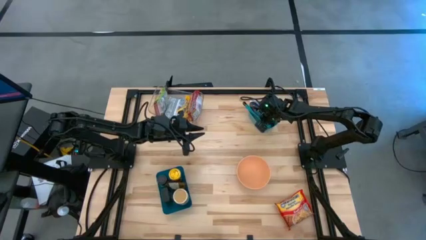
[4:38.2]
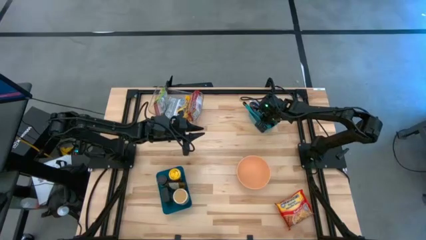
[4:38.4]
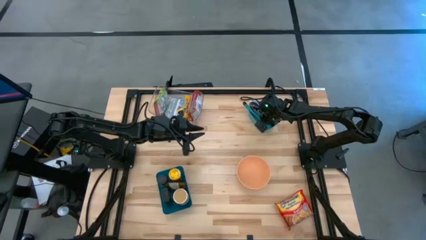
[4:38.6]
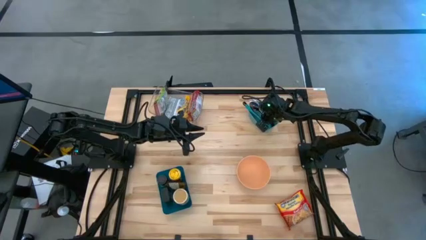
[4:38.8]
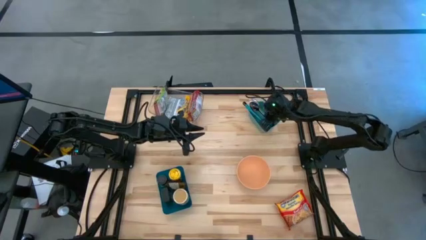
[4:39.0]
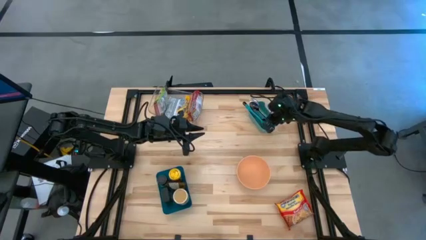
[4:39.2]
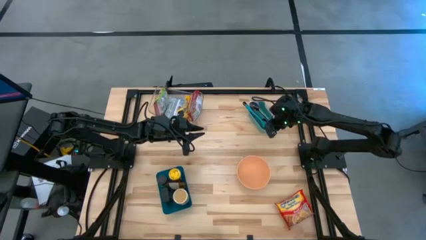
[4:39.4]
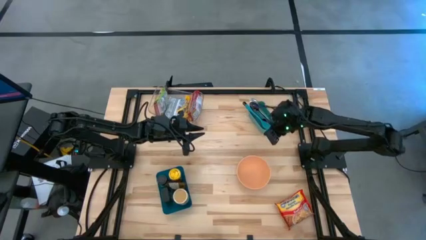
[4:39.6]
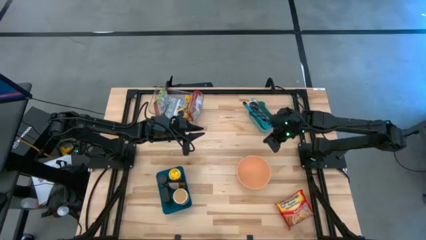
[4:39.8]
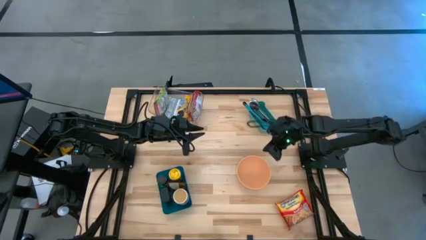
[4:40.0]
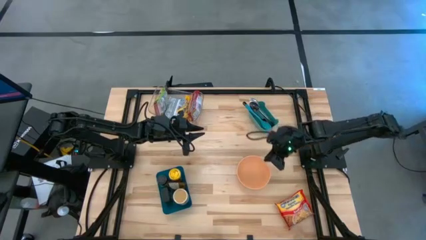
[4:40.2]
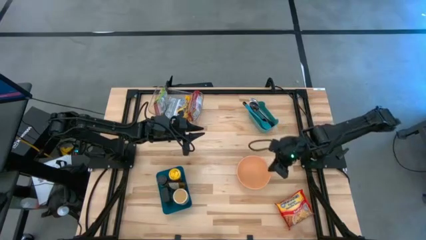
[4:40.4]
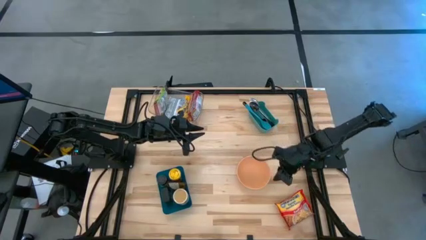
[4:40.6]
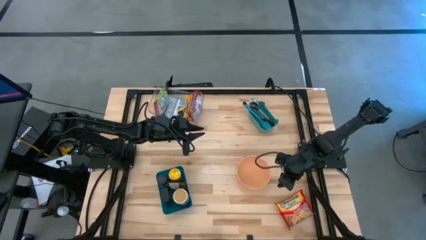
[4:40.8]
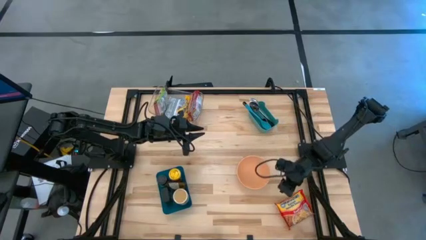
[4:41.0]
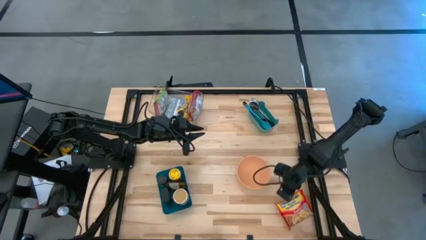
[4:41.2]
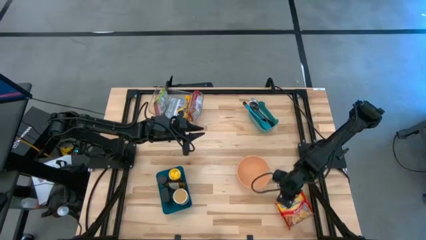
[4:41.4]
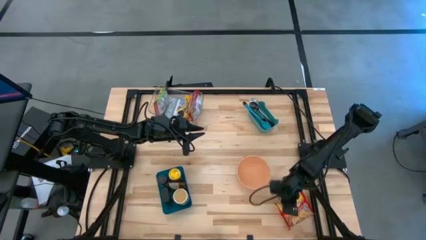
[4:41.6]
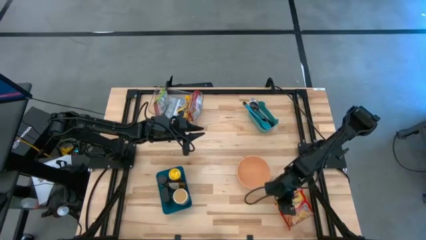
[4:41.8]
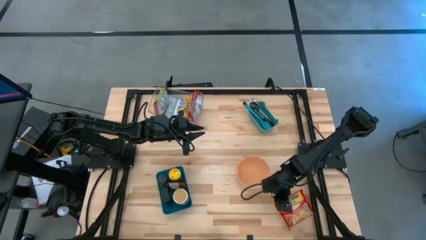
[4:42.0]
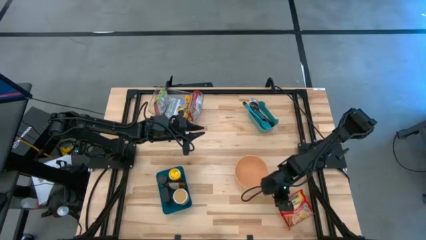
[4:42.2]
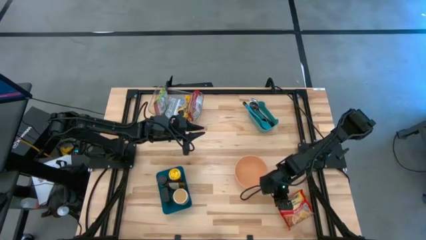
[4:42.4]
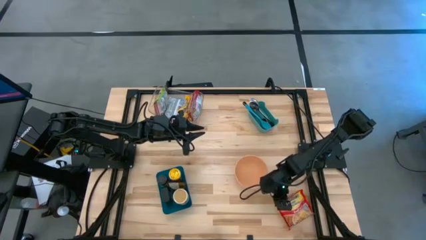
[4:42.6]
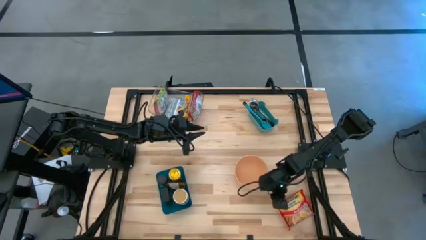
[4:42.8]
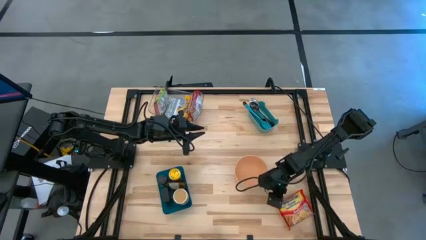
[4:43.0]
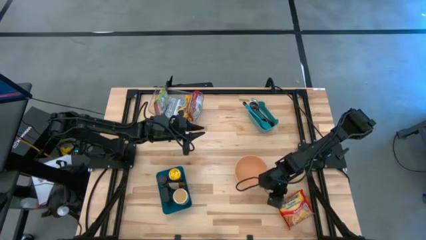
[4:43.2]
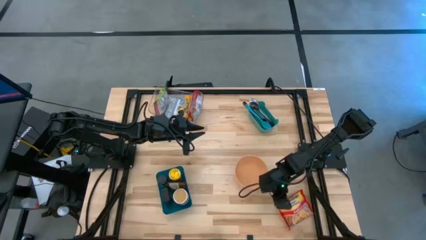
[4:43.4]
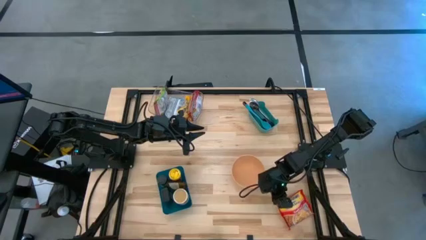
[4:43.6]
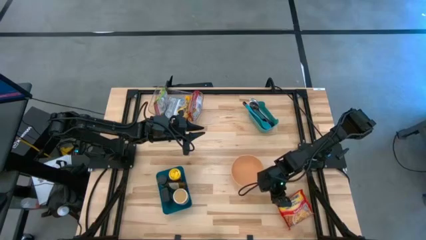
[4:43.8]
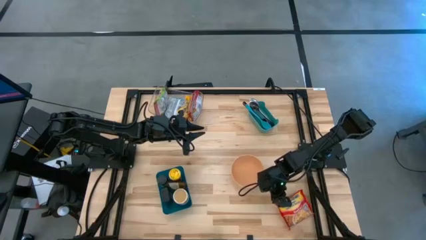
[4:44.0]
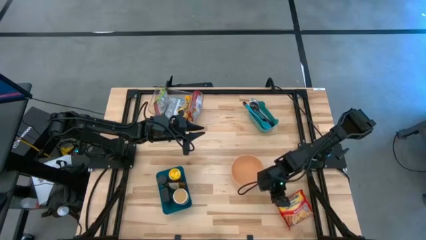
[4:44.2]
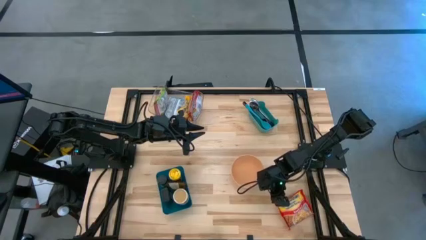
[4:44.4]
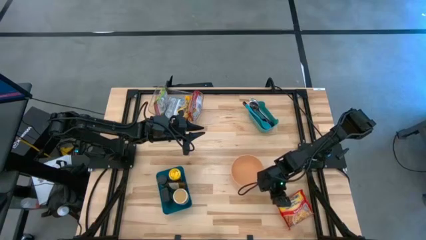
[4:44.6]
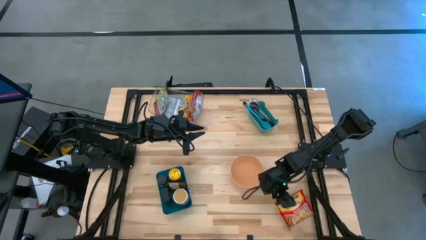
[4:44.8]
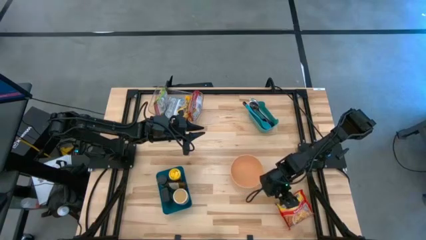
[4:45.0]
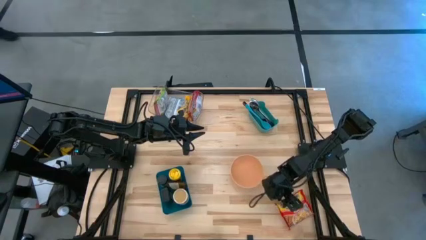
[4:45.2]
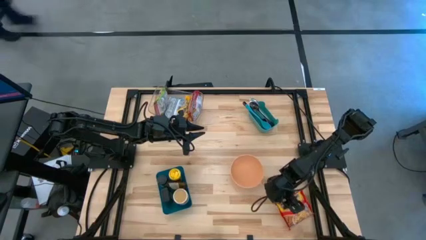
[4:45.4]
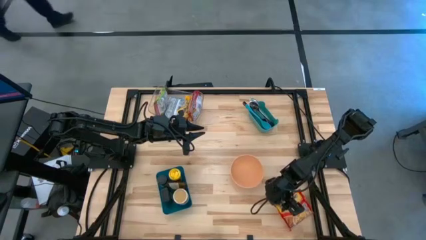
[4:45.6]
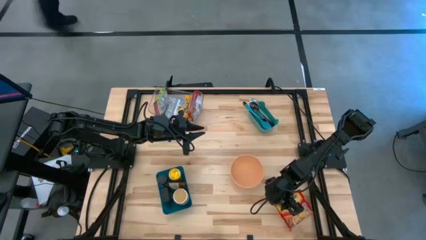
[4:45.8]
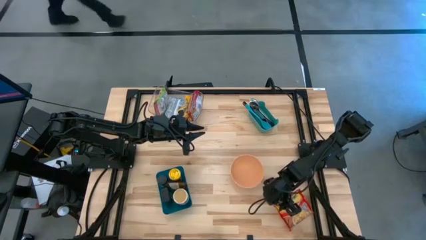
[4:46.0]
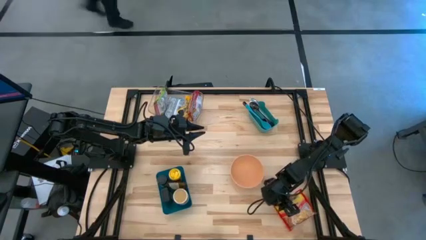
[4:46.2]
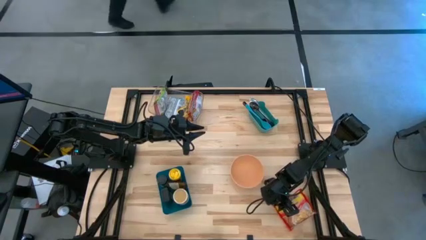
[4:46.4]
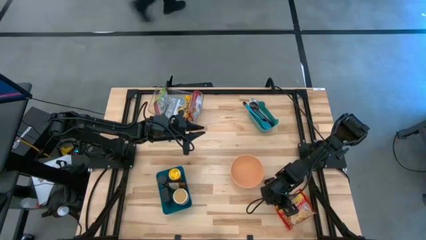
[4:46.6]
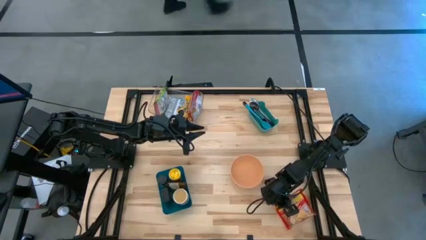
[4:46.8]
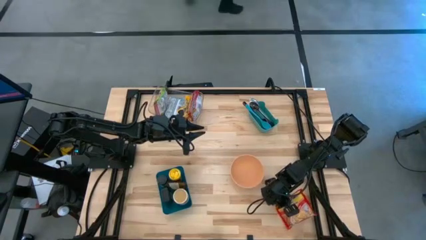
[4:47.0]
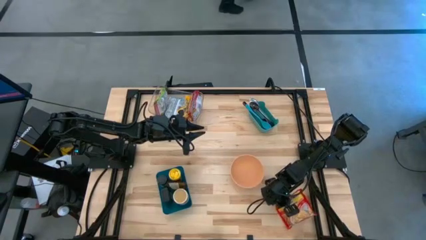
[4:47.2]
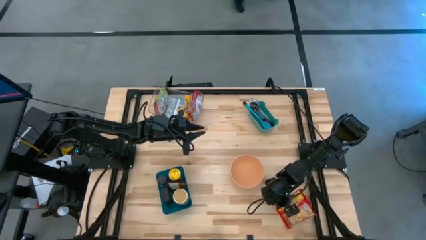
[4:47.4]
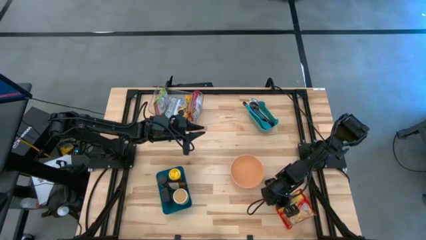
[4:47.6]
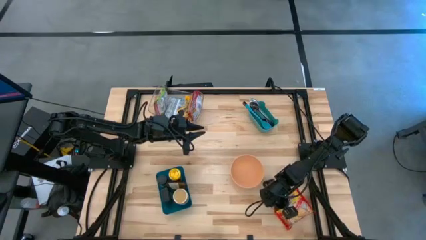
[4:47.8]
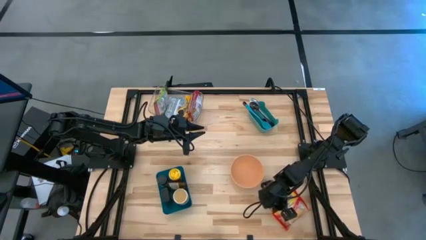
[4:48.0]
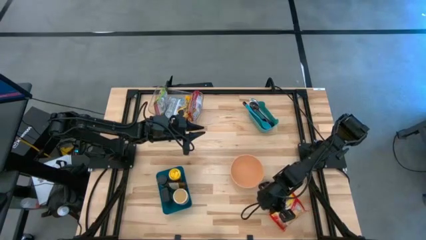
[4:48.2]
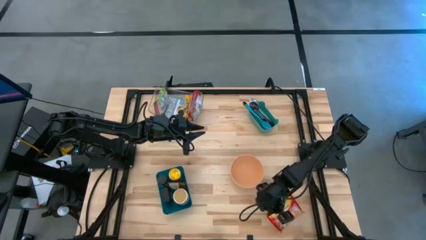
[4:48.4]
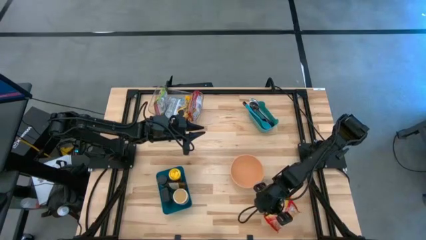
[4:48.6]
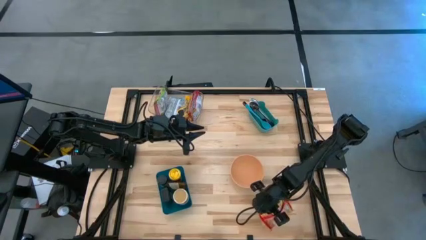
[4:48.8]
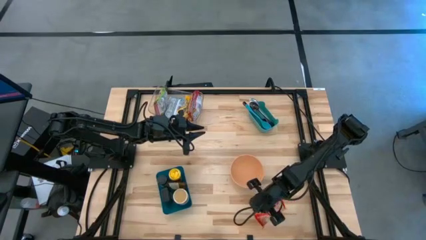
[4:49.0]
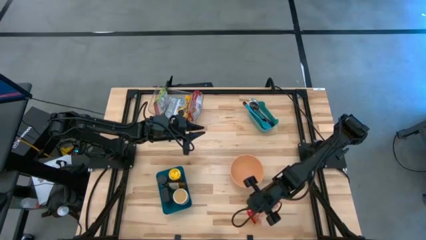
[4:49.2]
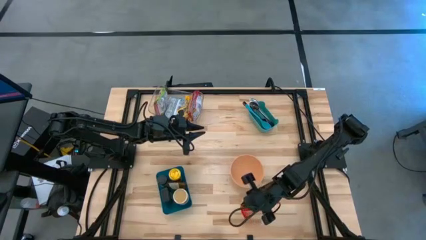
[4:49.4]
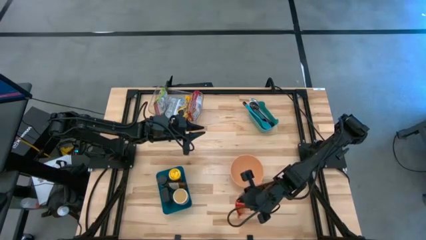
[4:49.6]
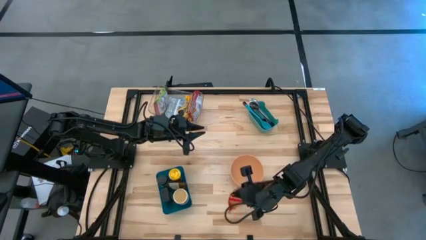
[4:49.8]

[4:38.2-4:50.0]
Task: Pick & Place Food Item
Put the red noodle pack into the transparent bin

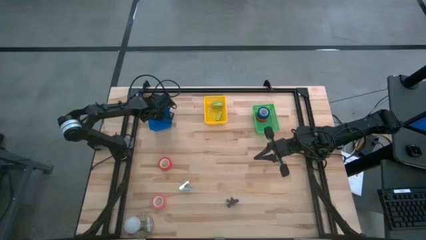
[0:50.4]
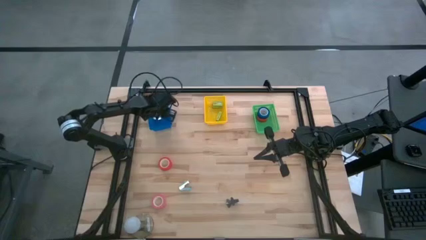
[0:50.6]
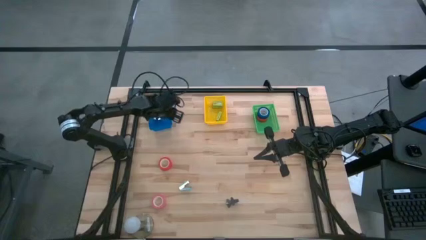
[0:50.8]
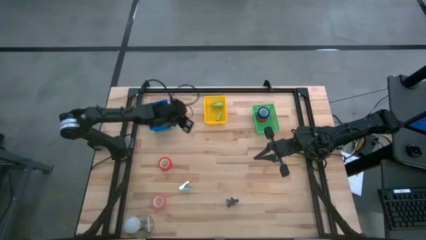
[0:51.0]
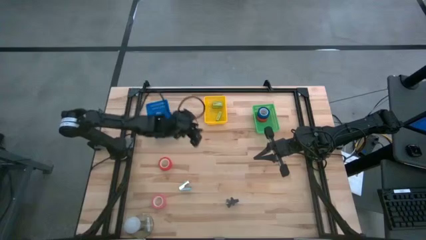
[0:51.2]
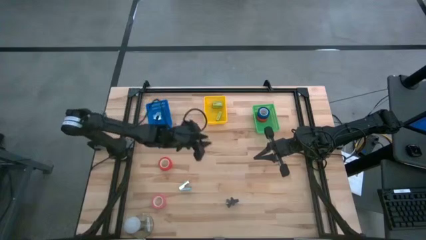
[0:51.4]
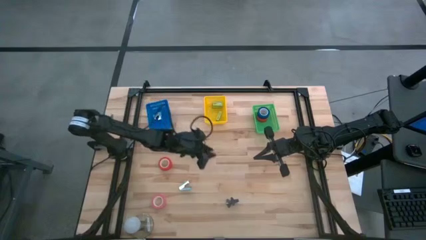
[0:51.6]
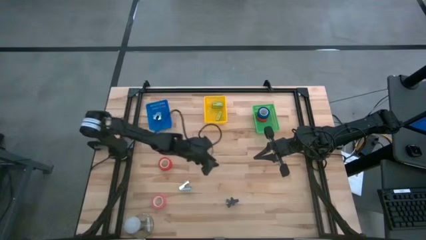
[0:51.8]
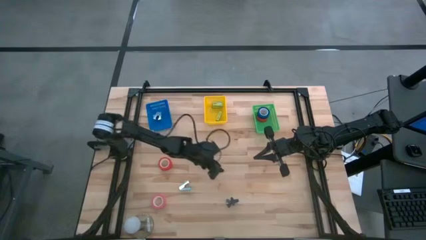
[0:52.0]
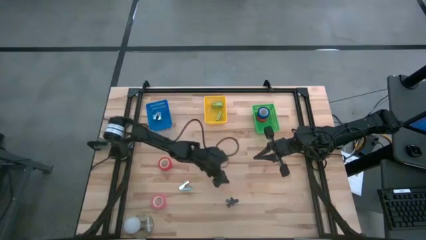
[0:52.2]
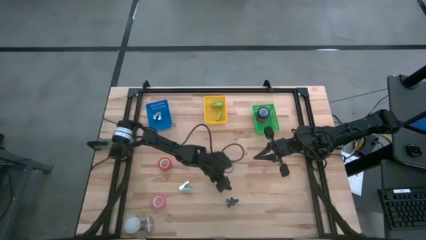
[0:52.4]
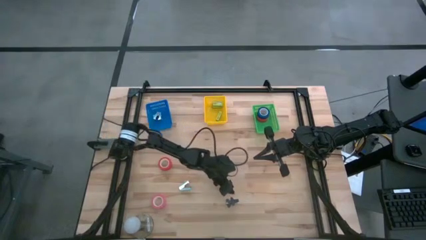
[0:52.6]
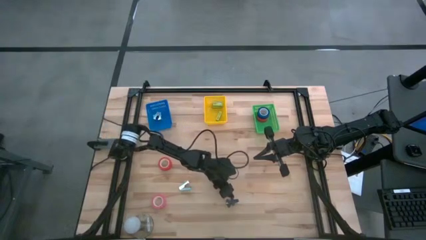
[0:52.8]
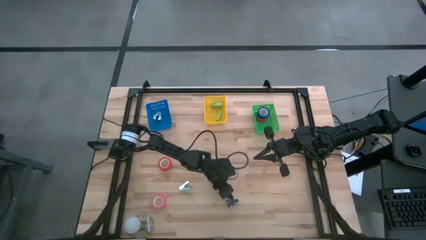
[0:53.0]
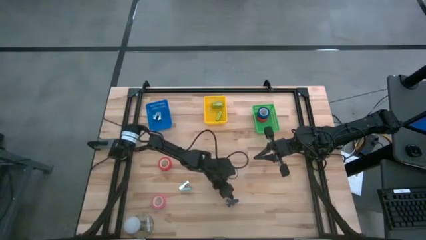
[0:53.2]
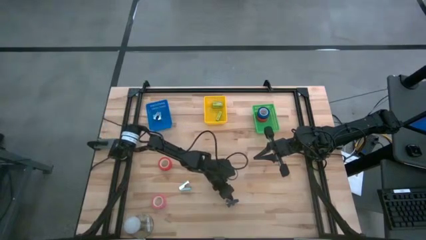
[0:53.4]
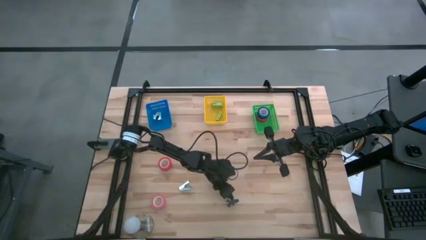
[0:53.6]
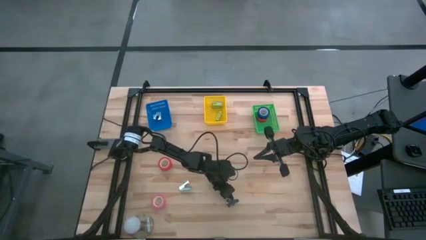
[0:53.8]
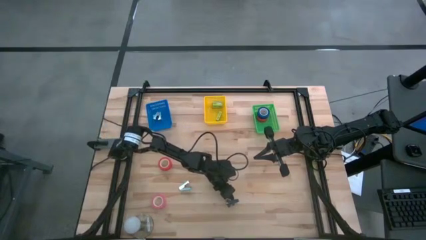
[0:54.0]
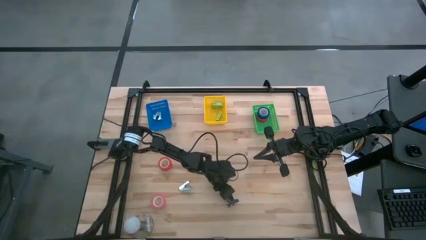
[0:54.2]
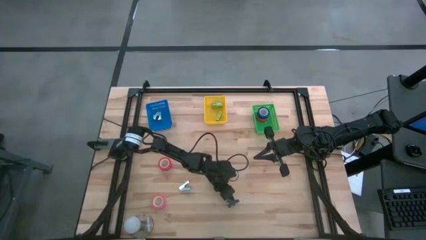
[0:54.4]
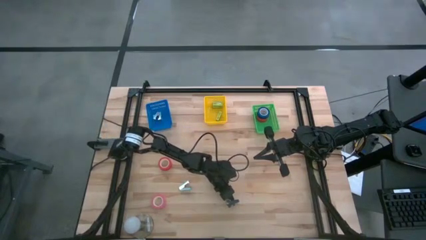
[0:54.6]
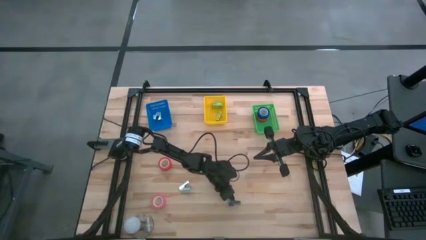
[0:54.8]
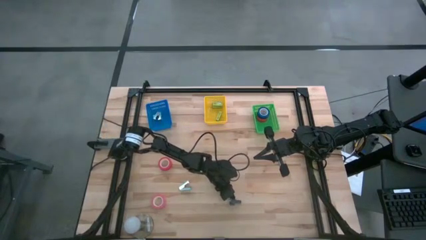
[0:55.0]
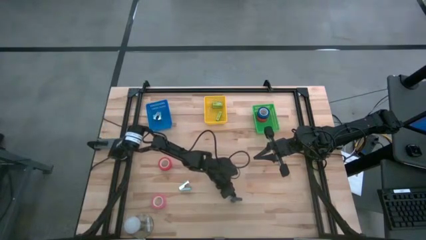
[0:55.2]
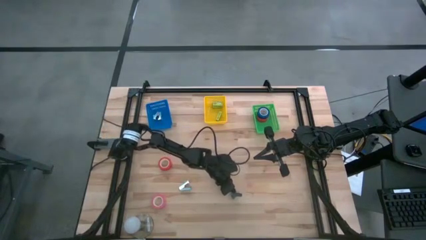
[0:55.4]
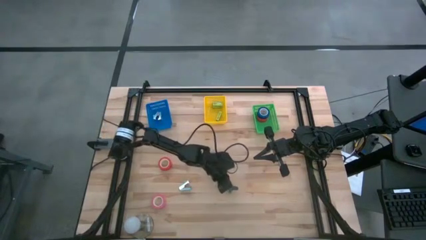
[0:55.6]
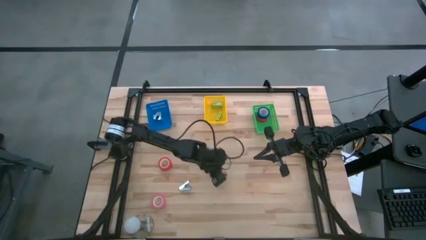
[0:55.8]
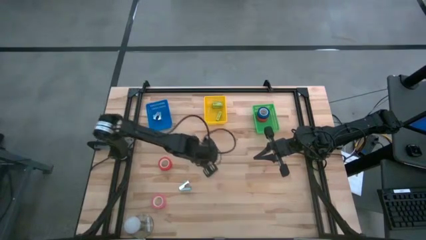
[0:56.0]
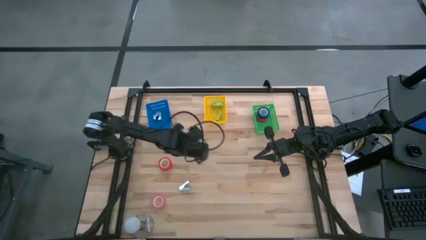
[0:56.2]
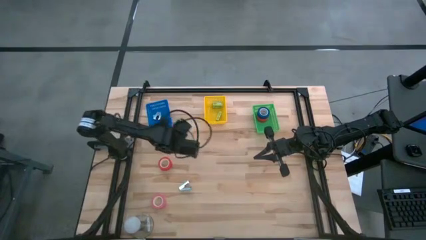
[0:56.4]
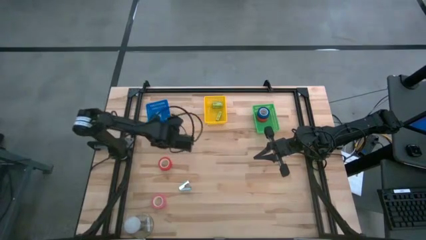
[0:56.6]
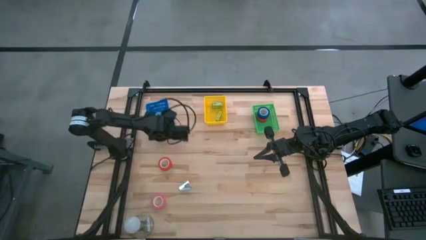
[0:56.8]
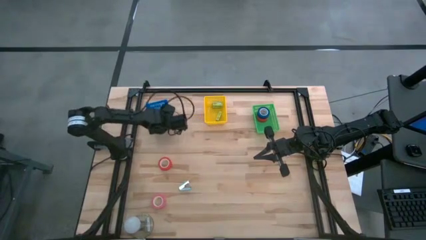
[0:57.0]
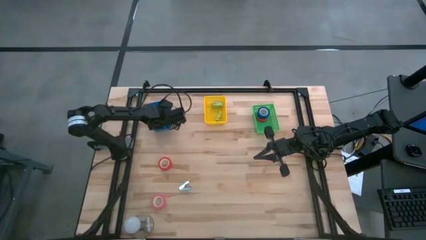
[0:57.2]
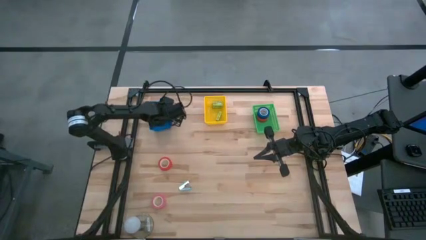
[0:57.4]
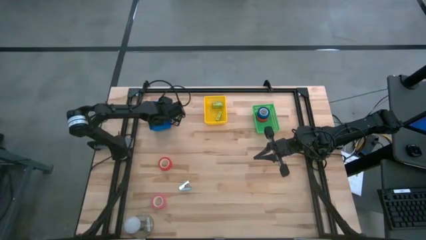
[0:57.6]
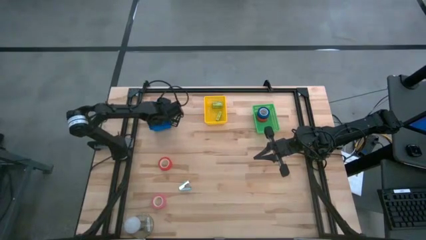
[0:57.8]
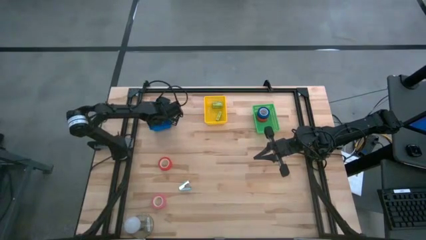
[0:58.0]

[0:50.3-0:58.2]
Task: Pick and place Stapler, Stapler remover, tape
Put the black staple remover into the blue bin
